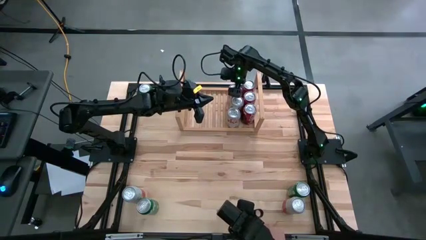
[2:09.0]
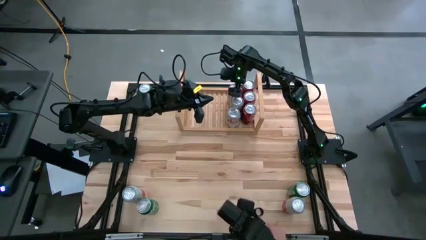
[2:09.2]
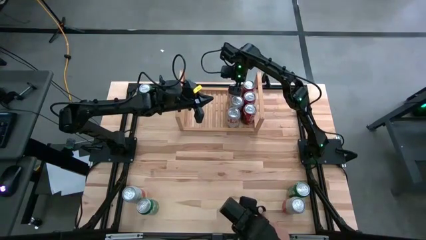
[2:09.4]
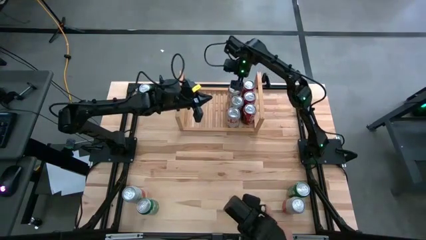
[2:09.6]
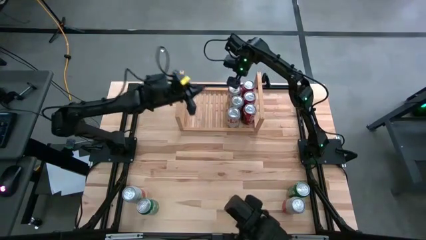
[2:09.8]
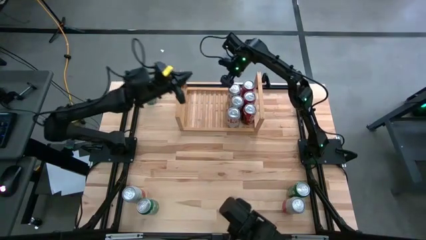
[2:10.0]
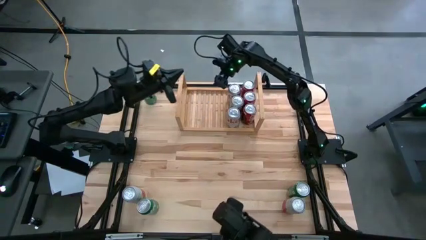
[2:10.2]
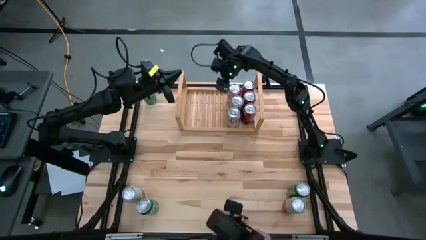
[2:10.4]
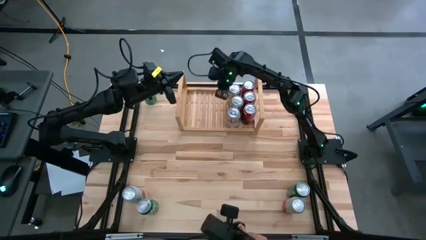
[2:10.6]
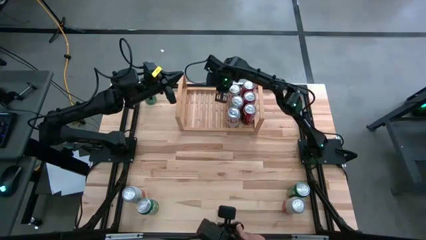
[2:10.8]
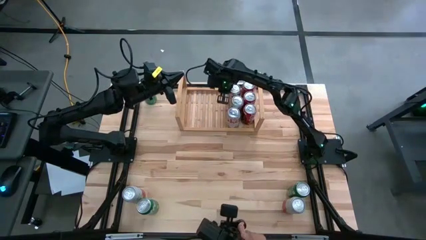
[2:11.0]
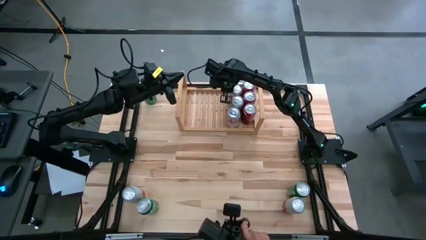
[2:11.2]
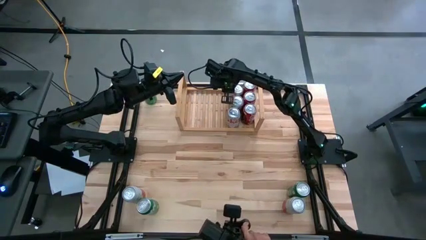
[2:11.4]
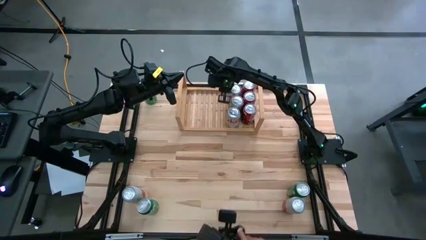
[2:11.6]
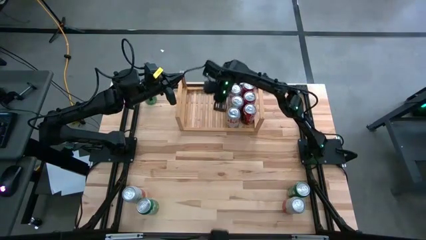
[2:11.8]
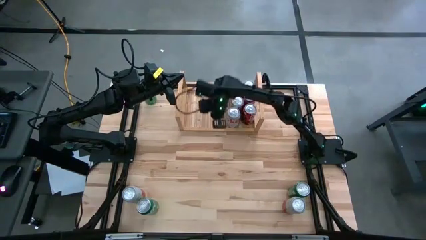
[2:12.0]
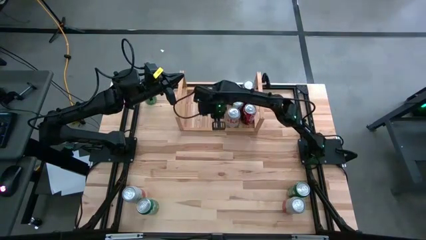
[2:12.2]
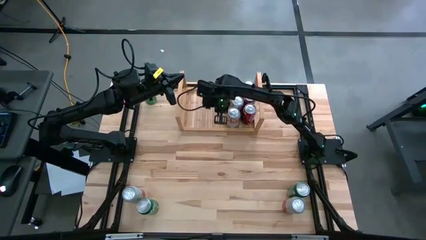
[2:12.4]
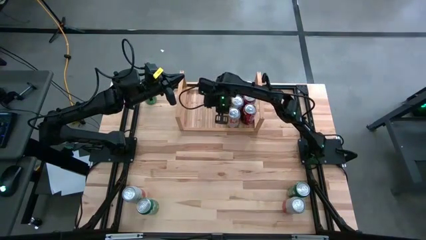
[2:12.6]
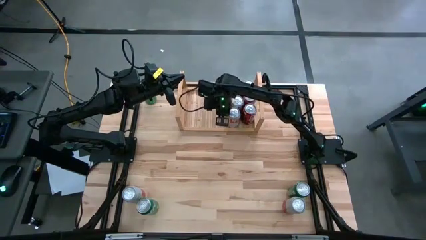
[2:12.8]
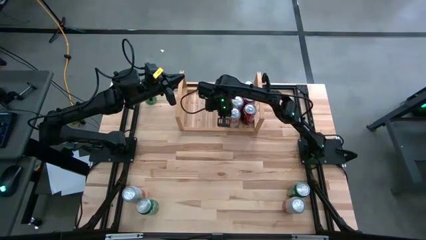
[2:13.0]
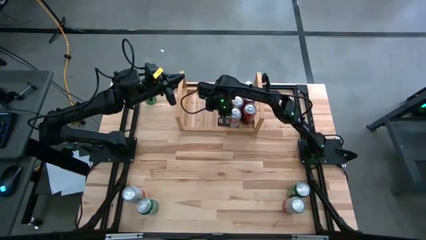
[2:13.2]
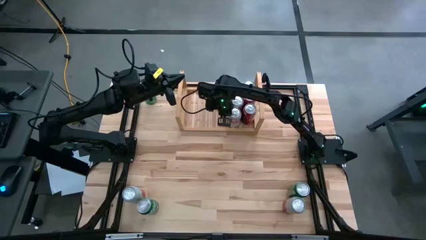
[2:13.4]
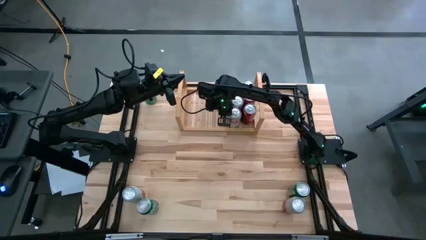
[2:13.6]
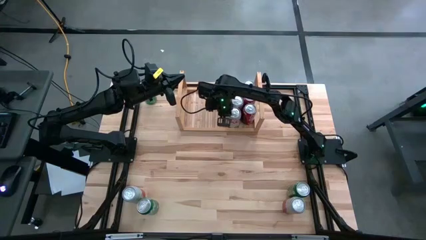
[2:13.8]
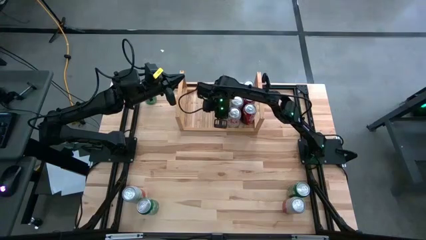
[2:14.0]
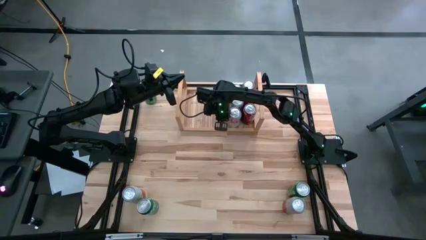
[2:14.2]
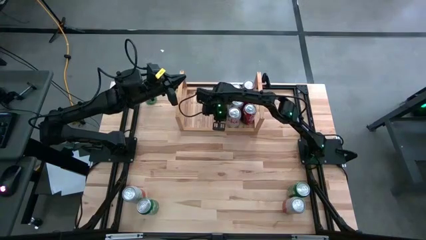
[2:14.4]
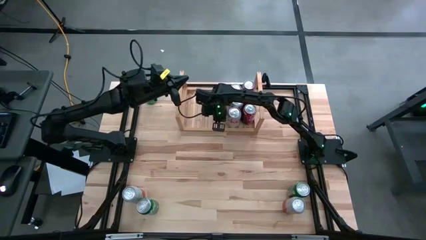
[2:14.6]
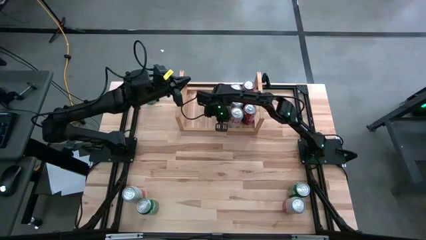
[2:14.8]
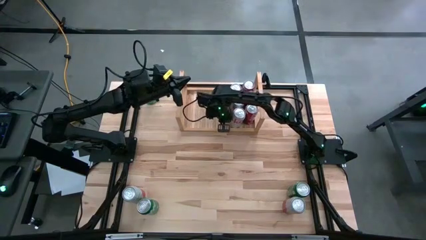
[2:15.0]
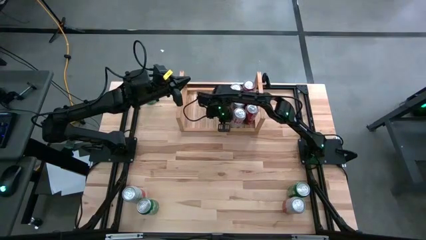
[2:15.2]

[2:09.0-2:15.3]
Task: Place canned beverage on shelf
Adjust the red-silver soda cans on the shelf

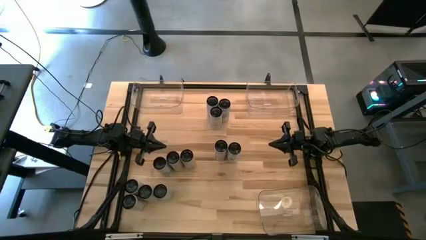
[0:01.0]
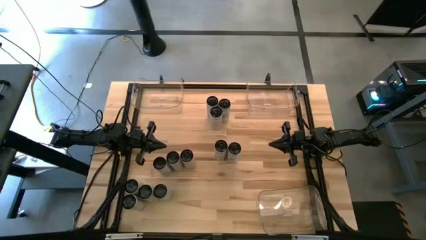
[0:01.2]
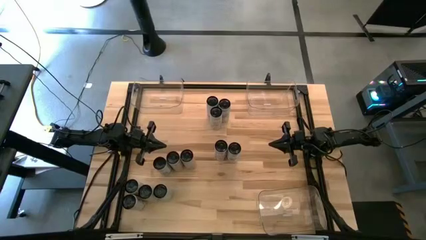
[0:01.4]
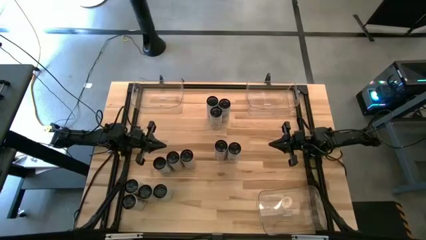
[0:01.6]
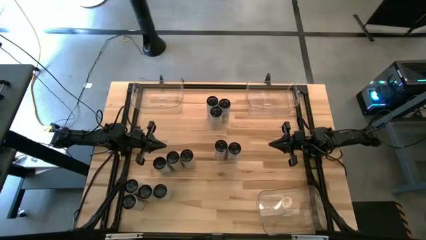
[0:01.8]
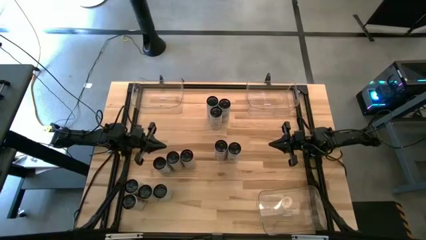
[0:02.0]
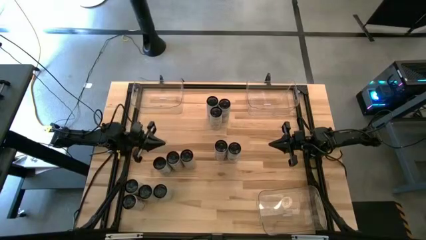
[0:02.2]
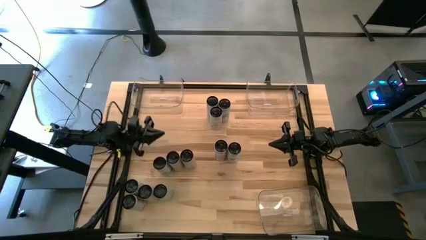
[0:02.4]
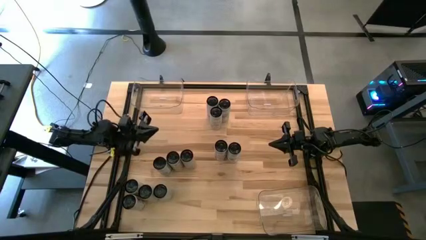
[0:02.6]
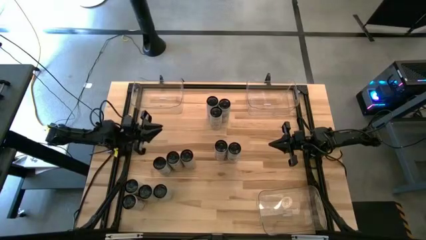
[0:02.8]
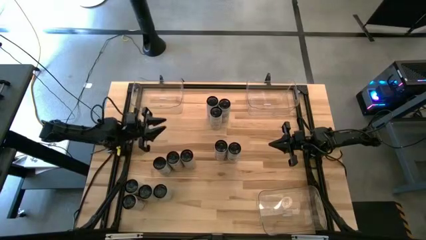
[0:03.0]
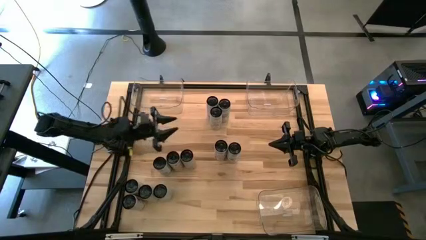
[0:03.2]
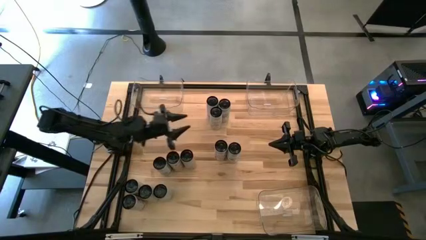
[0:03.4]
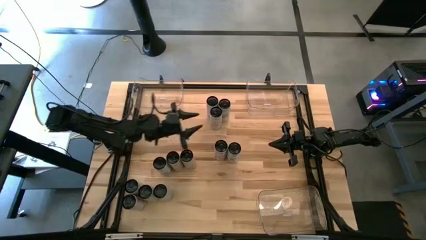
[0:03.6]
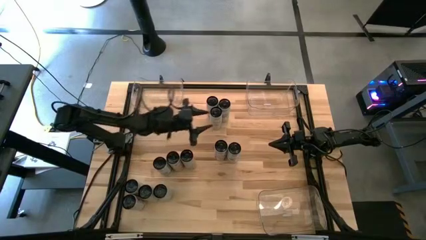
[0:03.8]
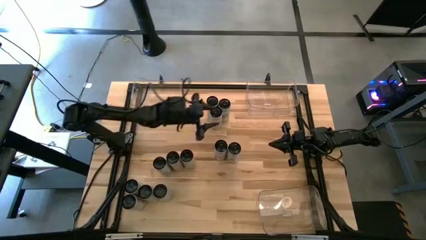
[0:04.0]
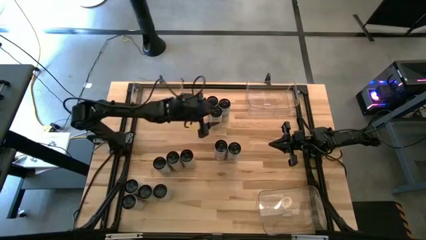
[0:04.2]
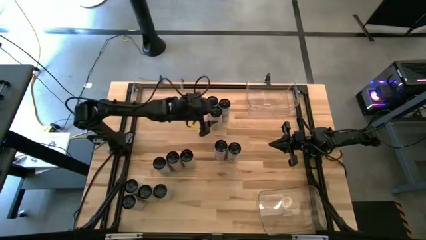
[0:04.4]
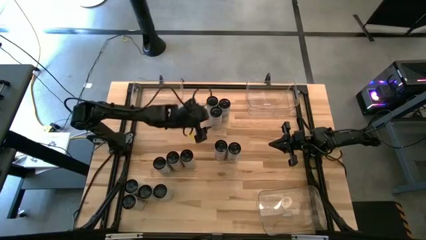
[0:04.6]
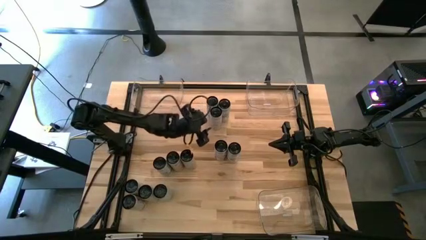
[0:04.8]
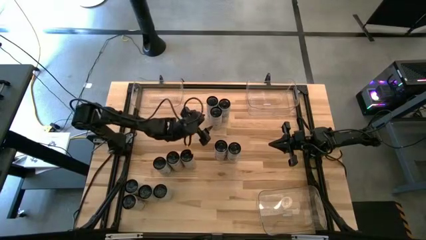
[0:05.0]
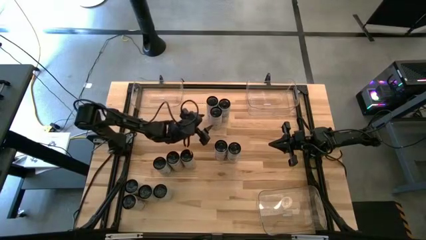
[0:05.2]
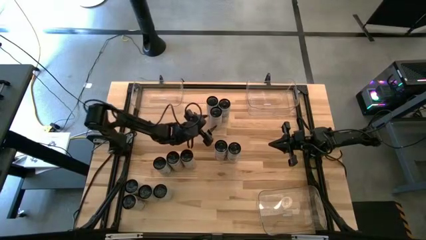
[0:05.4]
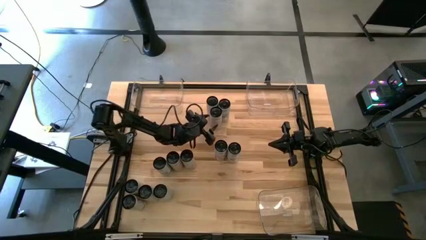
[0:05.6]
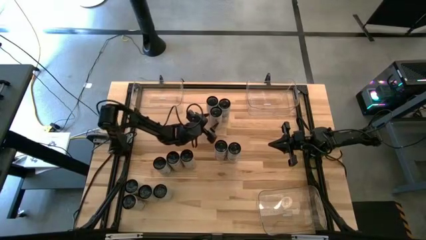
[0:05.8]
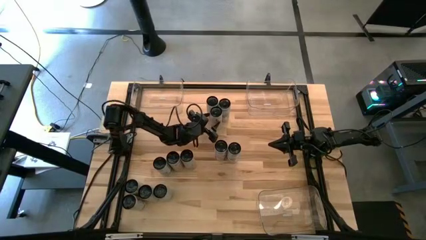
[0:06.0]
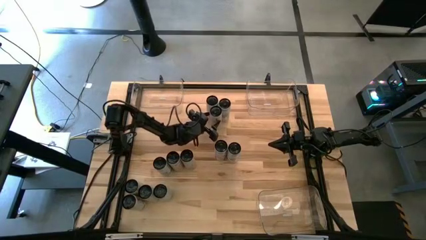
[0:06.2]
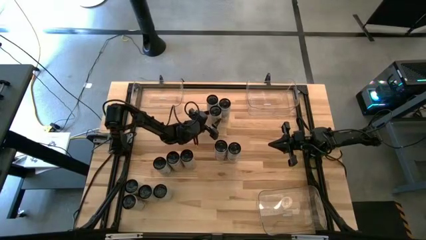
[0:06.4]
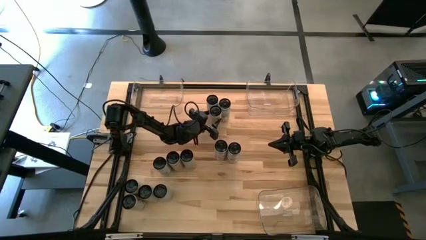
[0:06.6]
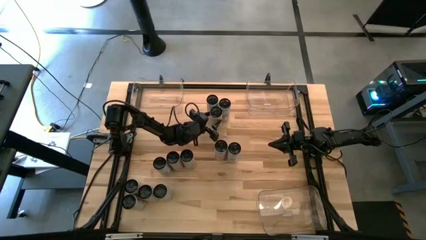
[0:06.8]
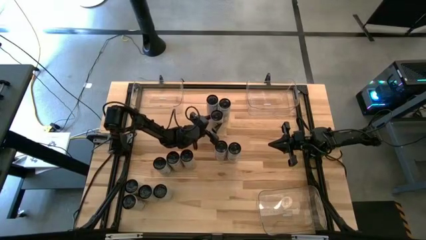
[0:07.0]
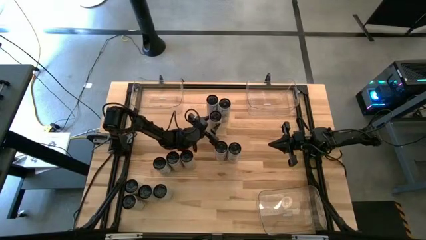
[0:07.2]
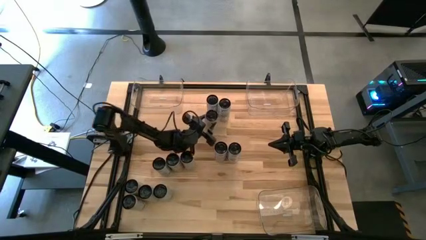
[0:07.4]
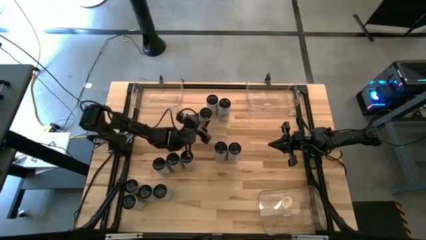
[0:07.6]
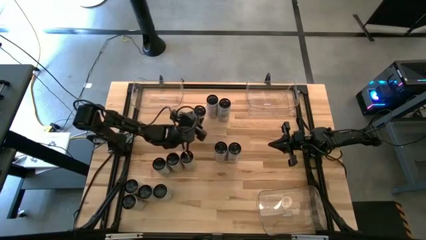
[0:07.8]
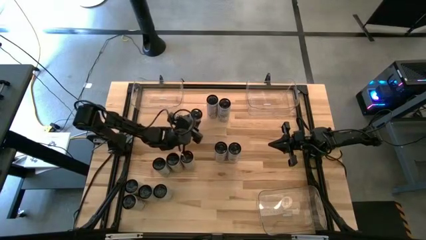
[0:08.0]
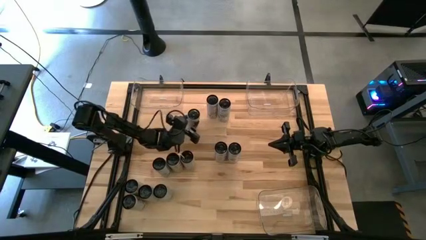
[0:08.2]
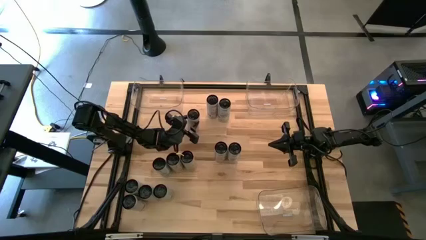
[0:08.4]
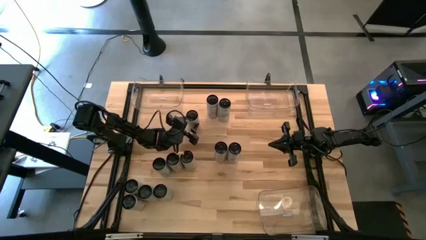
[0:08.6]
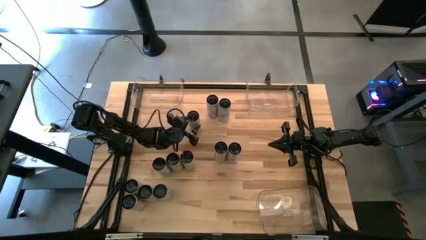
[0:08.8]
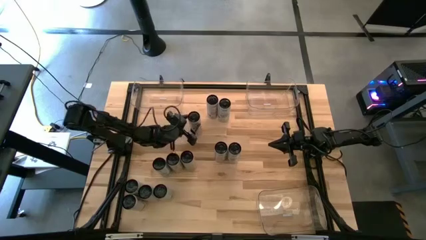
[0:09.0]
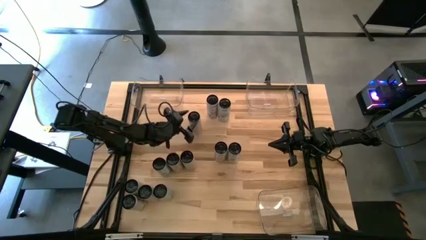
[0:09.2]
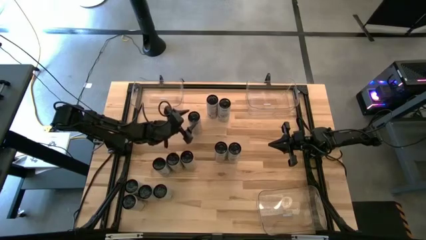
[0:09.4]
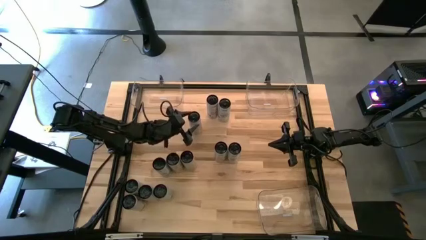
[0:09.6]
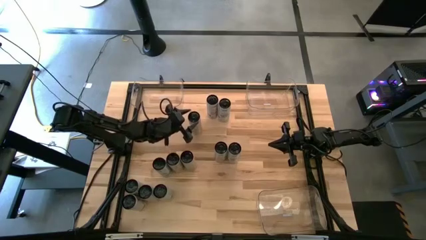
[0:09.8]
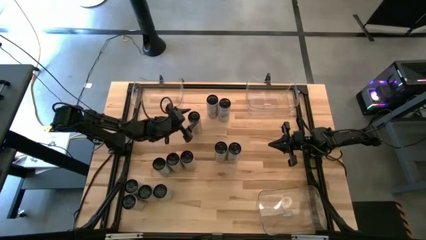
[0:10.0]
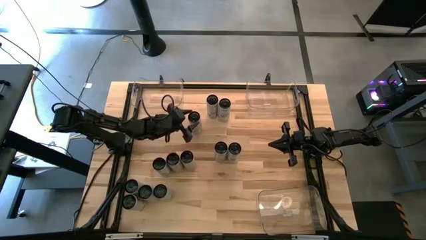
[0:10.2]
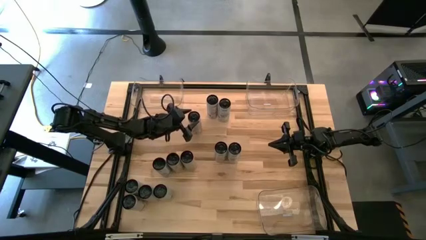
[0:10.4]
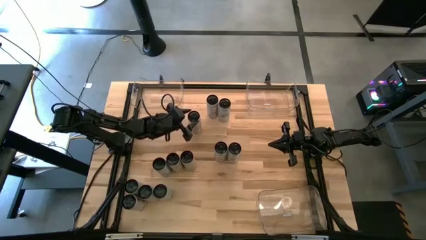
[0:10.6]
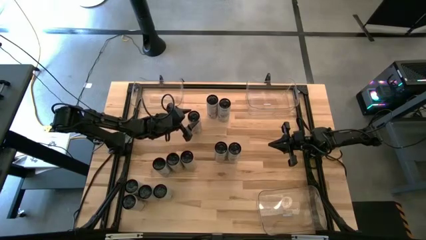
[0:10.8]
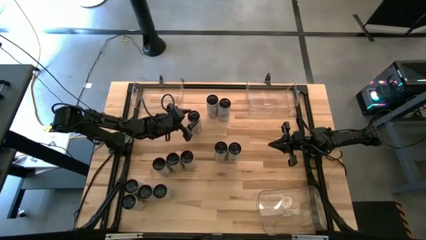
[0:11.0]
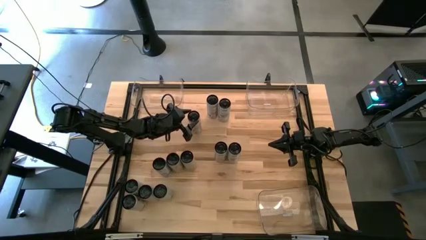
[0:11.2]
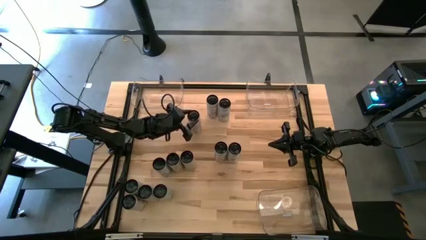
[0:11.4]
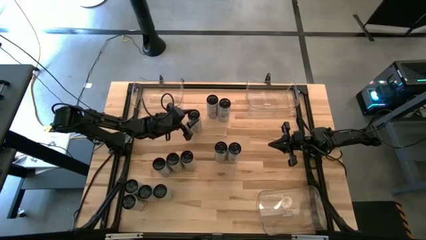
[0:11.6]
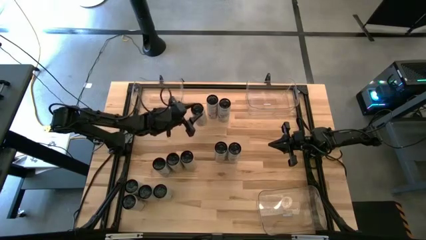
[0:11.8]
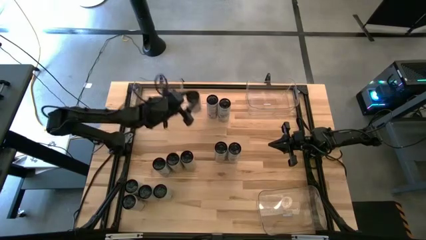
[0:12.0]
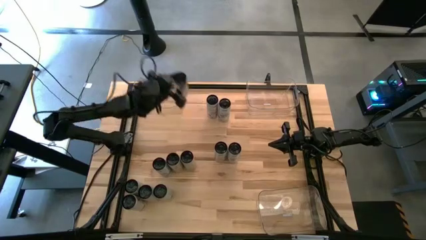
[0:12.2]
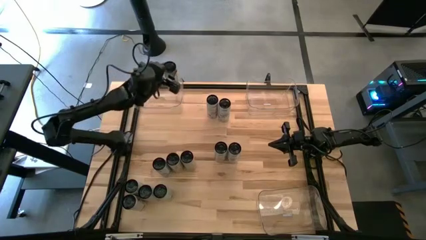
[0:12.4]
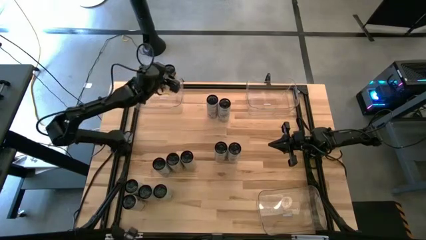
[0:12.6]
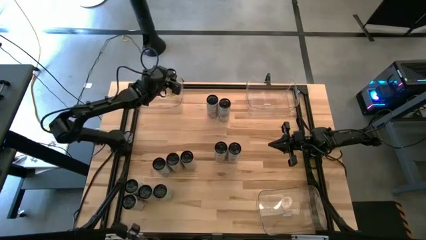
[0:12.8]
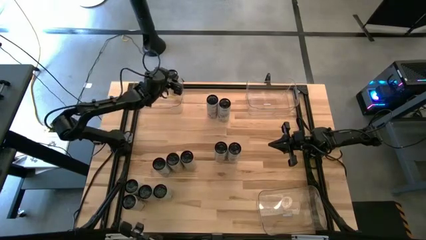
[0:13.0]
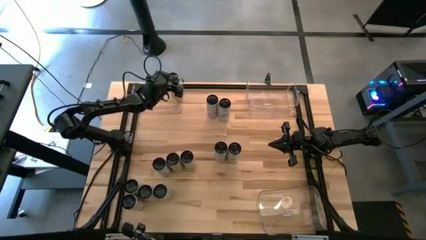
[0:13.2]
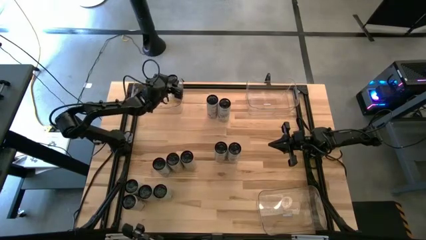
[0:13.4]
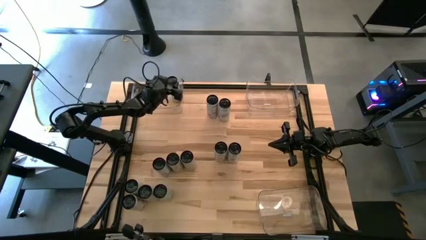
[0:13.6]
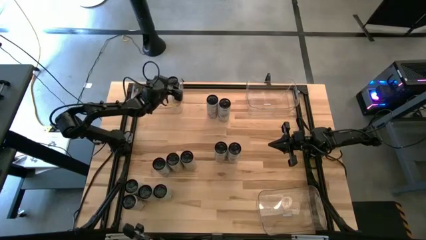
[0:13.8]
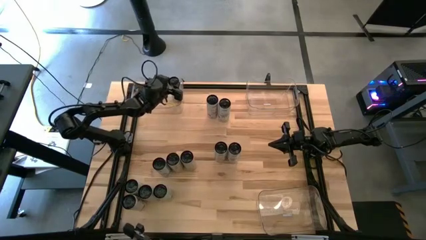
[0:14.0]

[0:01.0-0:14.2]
Task: Sort soda cans
Put the white-yellow soda can into the top left transparent bin
